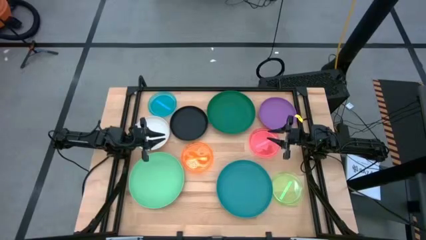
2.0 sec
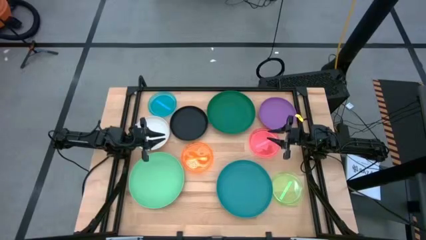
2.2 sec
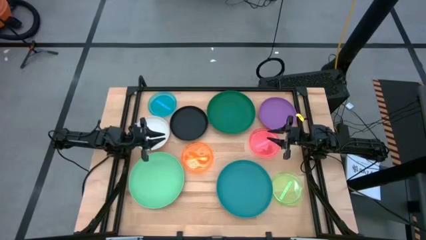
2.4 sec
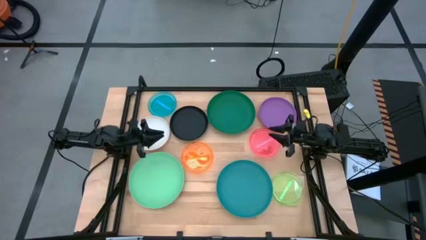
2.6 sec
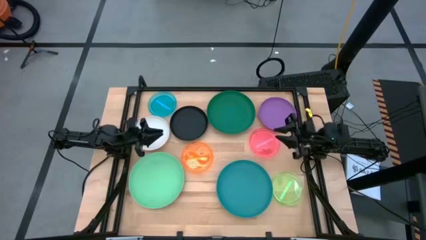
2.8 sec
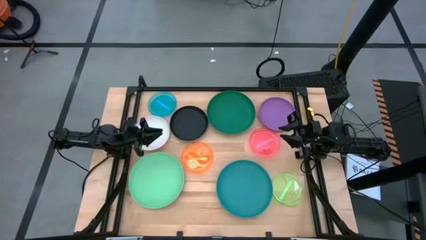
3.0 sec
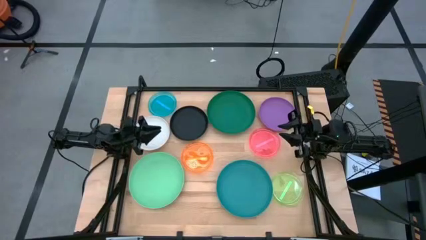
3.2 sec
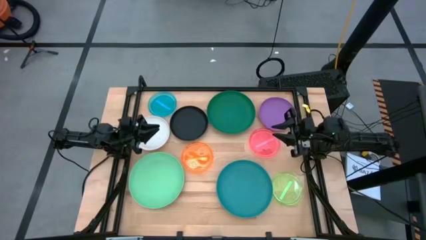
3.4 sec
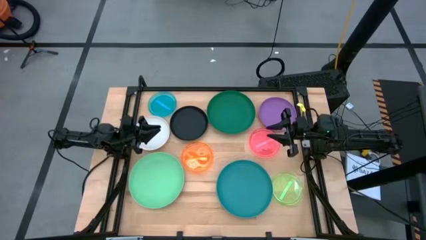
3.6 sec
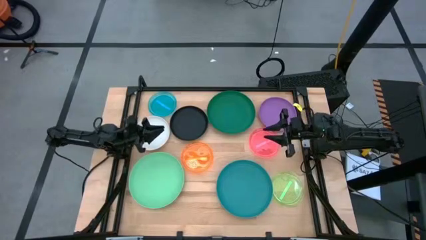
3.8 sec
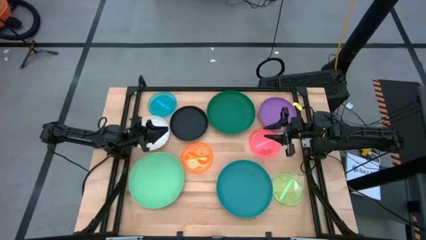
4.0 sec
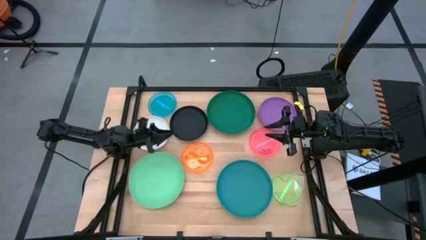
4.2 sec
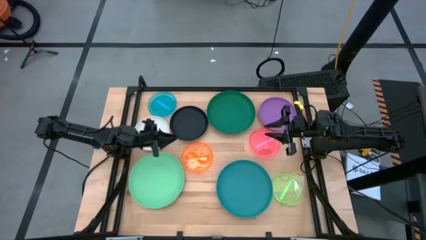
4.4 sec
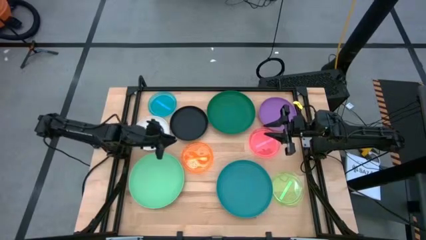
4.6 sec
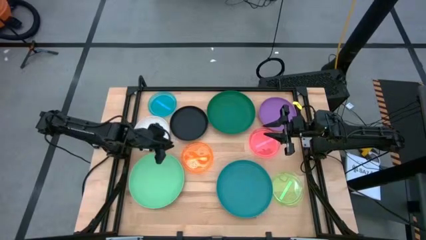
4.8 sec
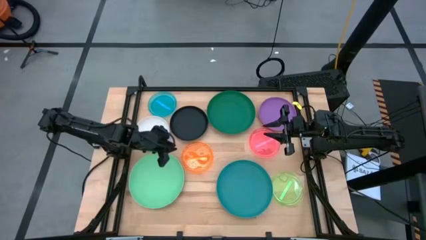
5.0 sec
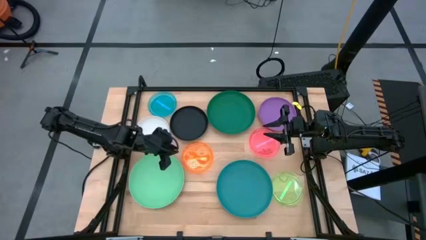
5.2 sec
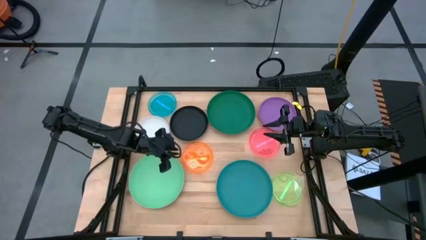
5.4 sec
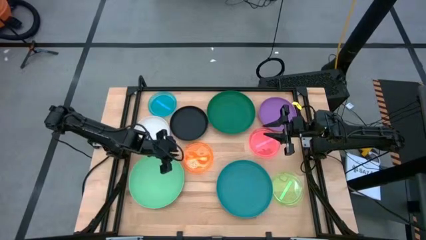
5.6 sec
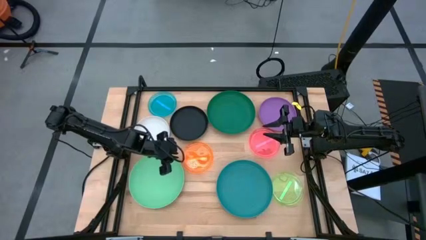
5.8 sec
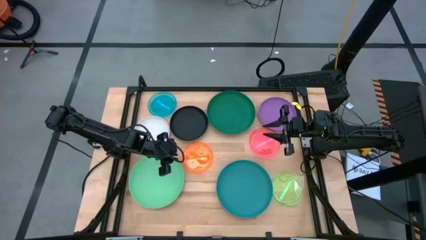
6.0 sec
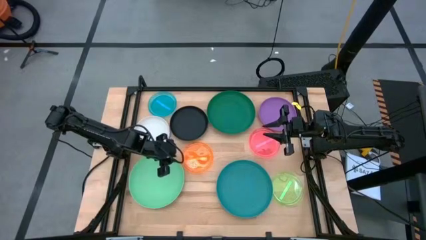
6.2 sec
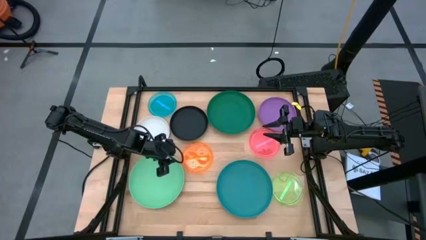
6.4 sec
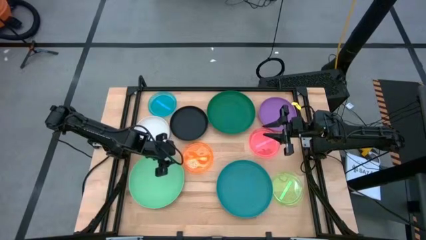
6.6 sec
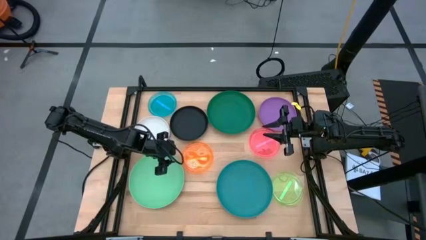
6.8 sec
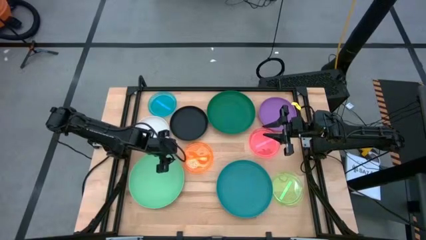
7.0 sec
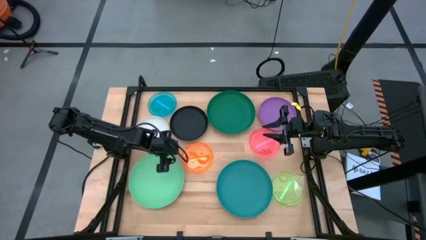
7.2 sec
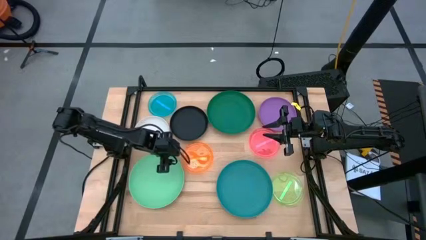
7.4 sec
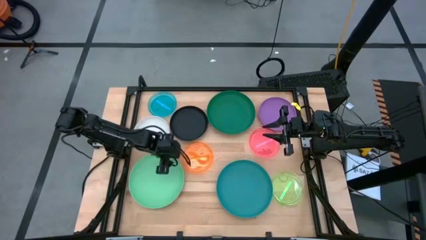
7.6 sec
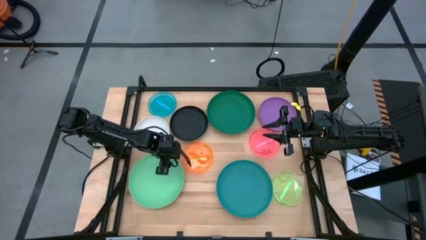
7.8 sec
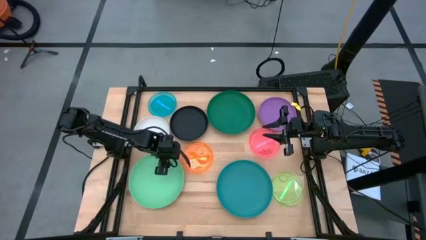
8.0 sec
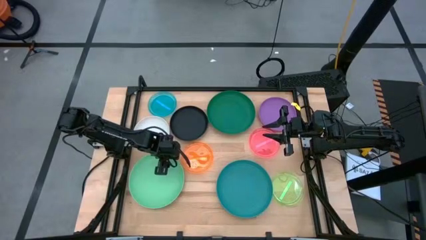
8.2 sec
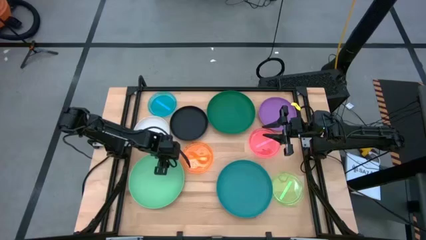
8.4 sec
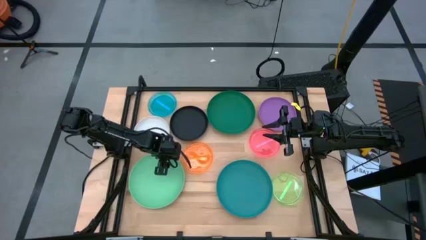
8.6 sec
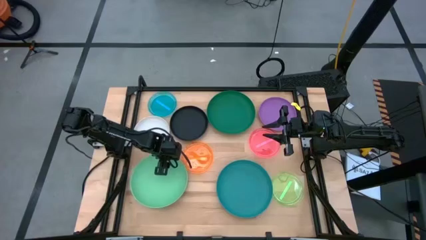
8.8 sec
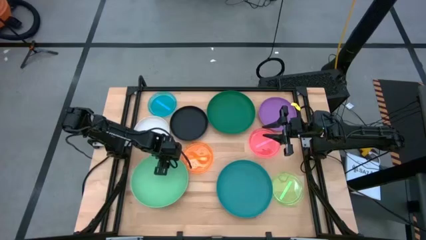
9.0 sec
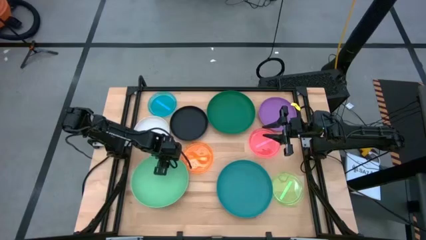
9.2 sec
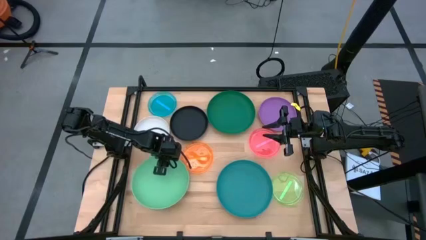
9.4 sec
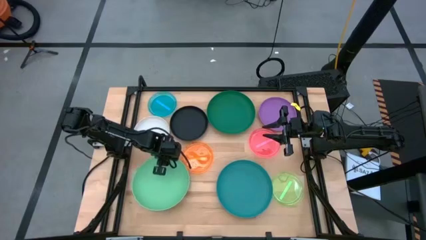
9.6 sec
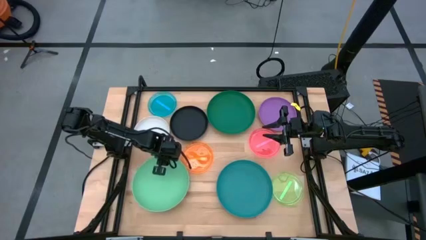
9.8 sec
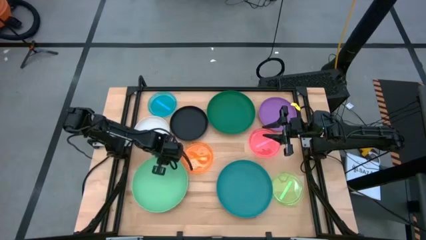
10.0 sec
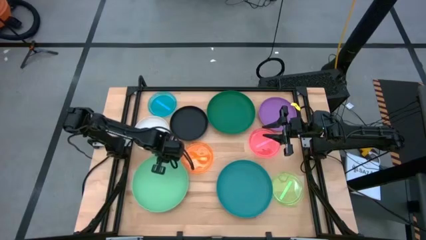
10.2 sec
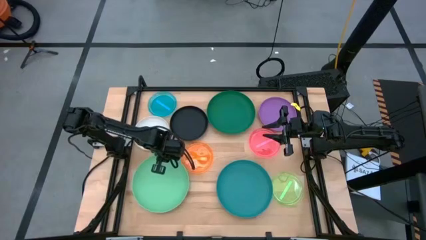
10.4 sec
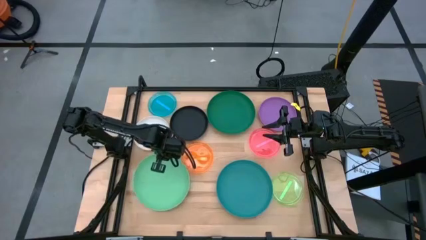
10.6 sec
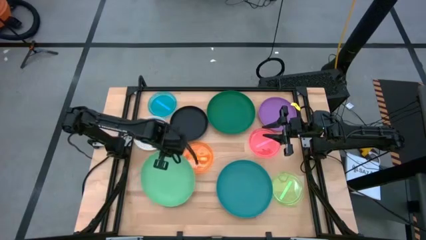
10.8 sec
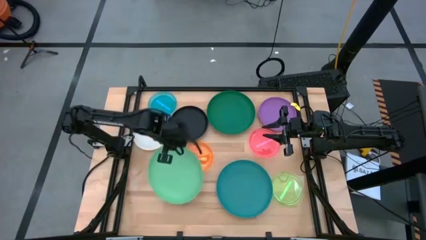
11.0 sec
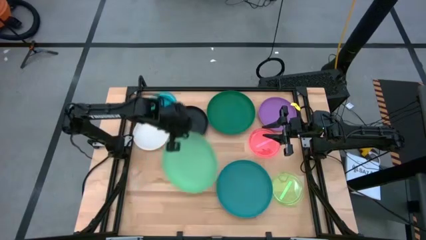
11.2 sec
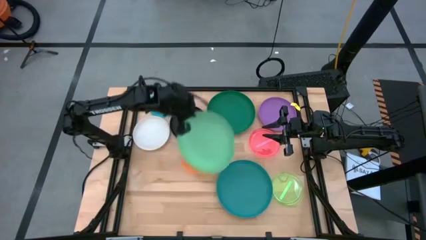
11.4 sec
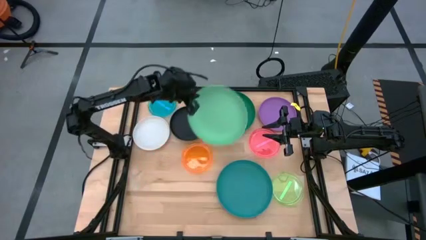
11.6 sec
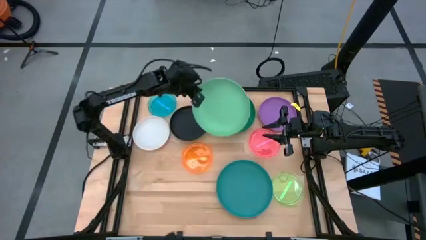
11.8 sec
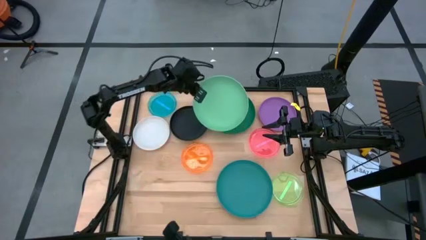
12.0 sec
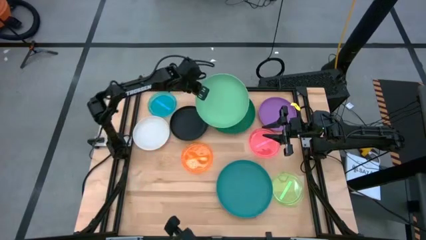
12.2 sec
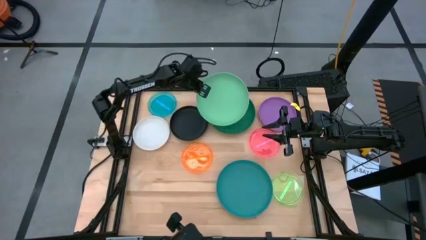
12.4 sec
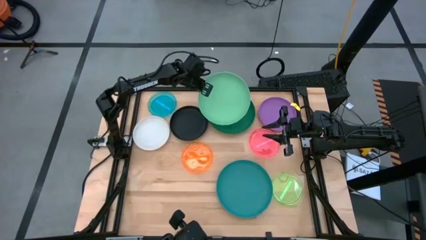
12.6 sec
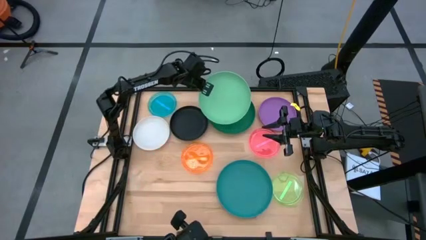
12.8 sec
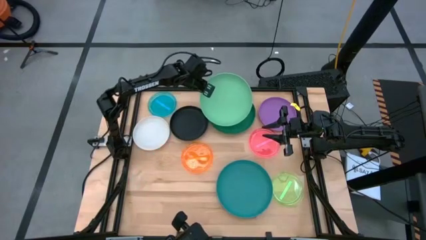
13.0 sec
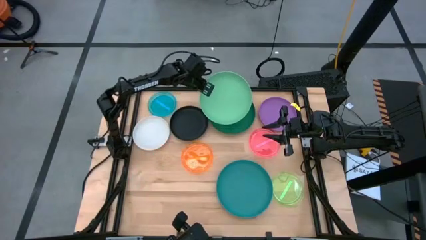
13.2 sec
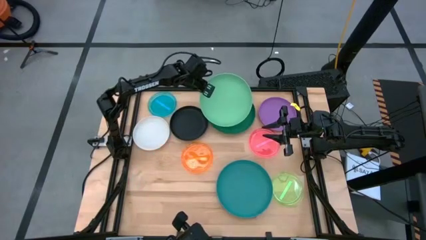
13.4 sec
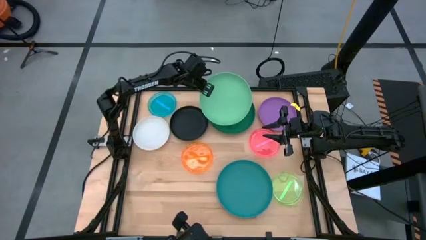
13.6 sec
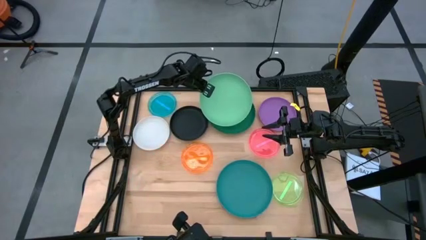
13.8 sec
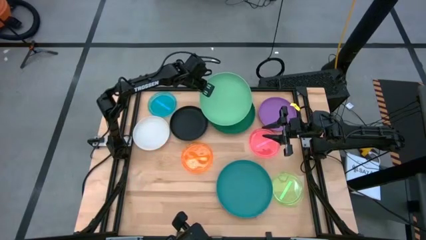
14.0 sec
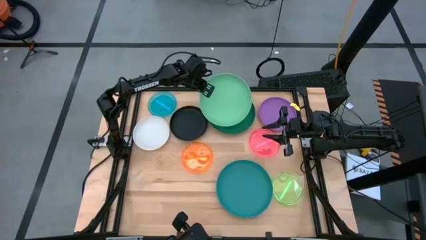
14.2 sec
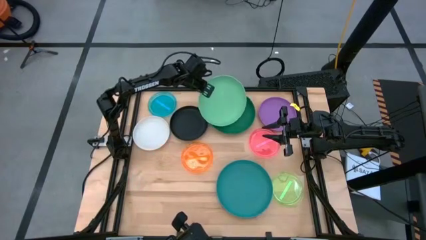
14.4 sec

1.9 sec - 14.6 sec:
Task: Stack plastic plates
Stack the light green plate on top of the green plate
